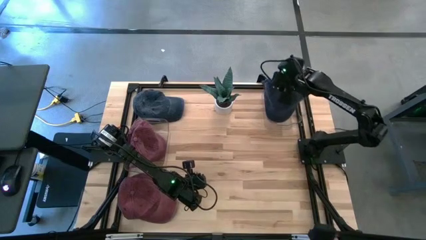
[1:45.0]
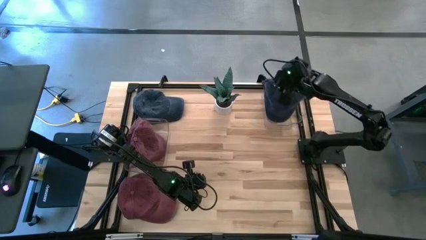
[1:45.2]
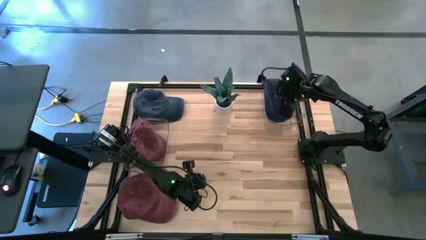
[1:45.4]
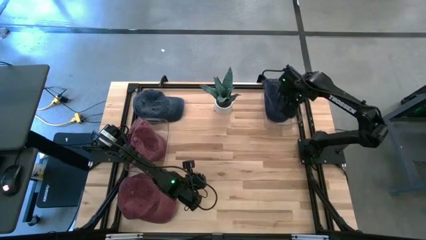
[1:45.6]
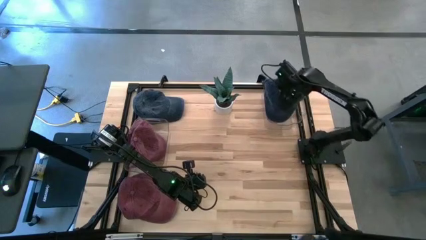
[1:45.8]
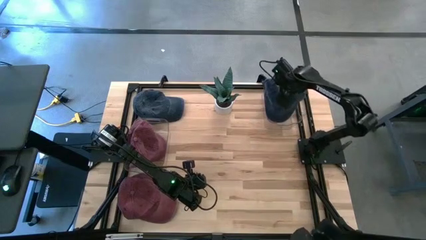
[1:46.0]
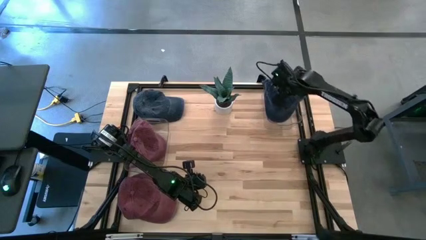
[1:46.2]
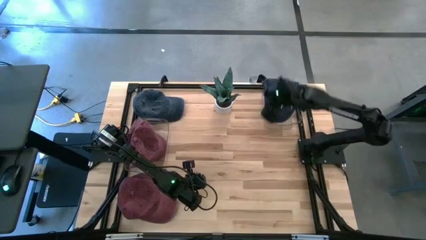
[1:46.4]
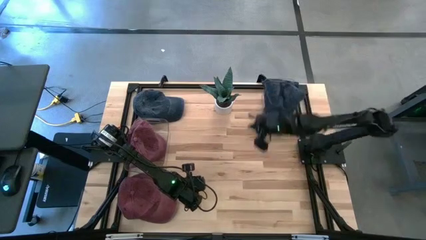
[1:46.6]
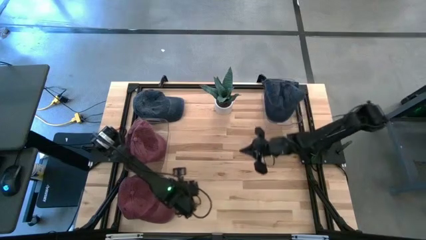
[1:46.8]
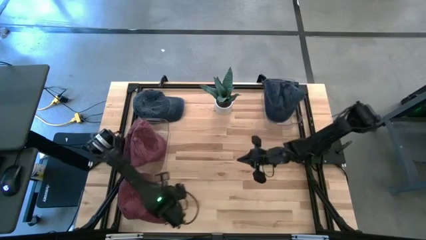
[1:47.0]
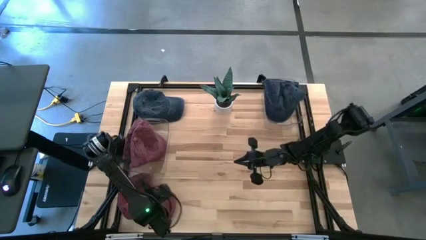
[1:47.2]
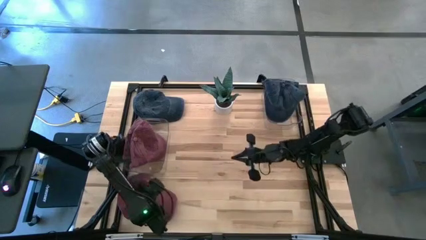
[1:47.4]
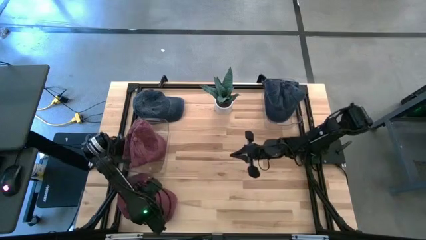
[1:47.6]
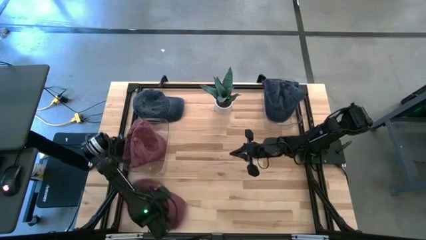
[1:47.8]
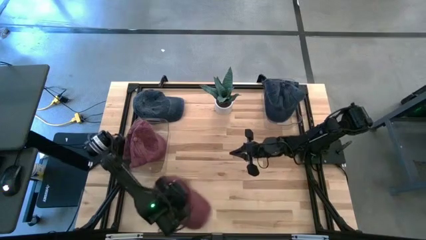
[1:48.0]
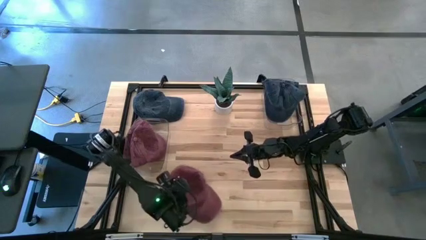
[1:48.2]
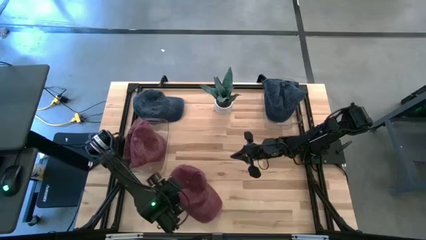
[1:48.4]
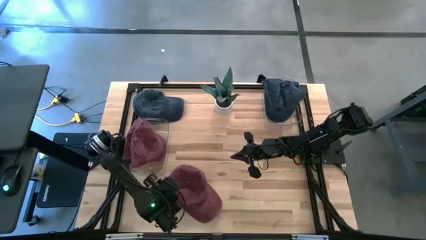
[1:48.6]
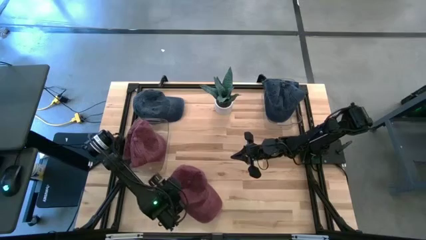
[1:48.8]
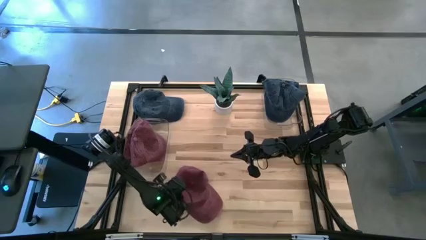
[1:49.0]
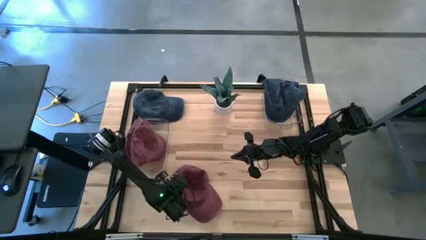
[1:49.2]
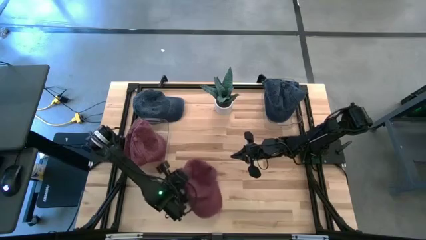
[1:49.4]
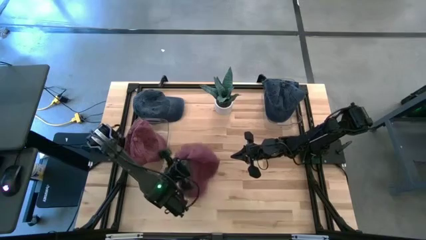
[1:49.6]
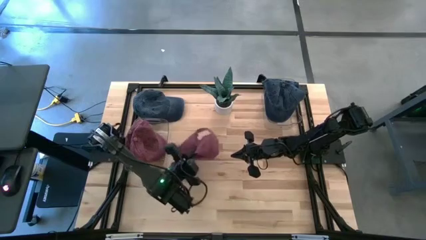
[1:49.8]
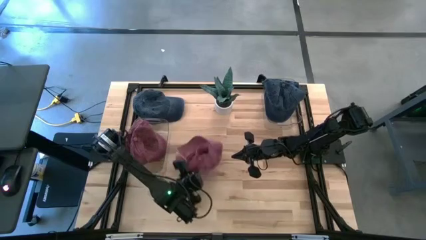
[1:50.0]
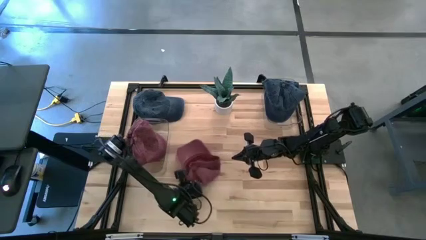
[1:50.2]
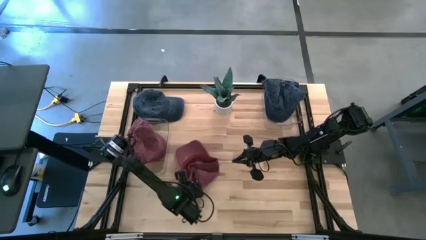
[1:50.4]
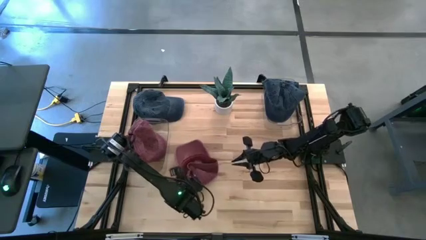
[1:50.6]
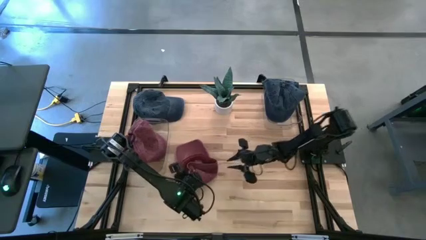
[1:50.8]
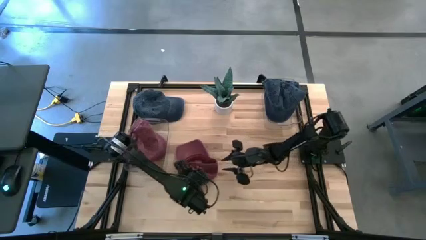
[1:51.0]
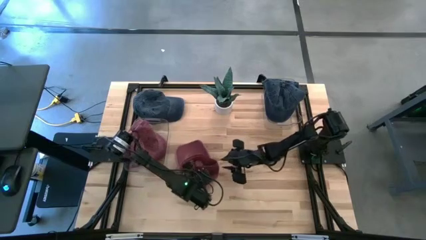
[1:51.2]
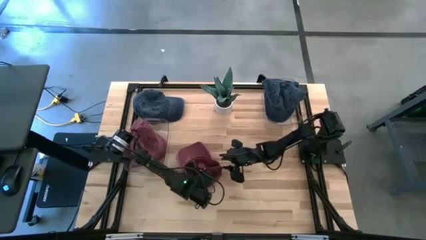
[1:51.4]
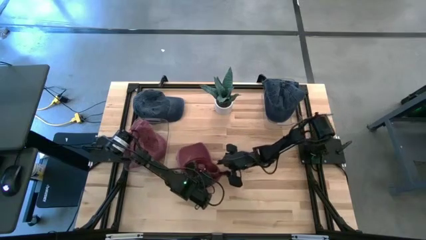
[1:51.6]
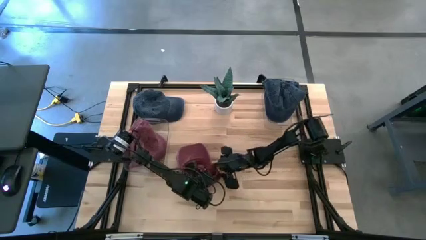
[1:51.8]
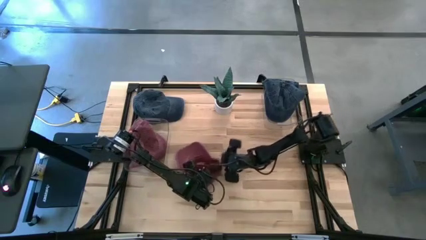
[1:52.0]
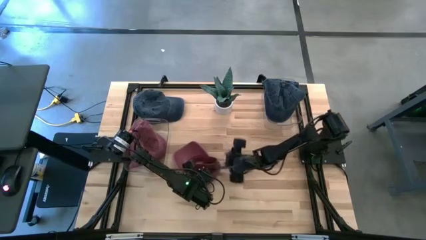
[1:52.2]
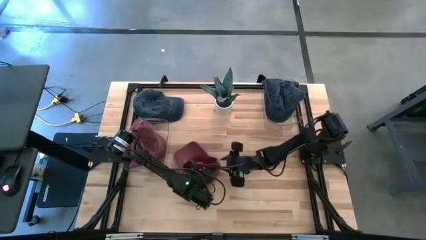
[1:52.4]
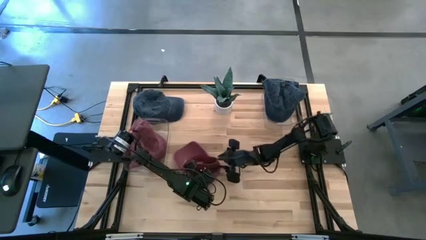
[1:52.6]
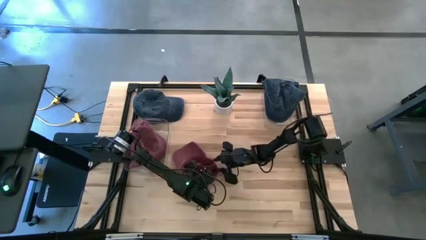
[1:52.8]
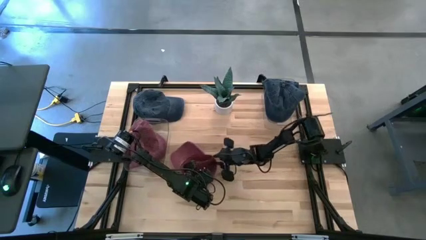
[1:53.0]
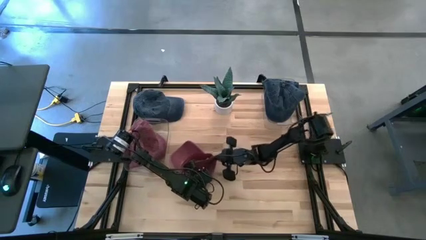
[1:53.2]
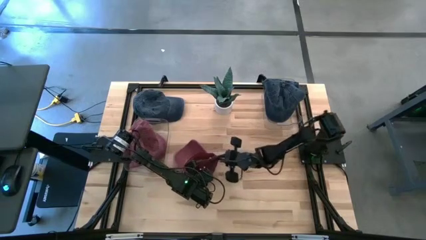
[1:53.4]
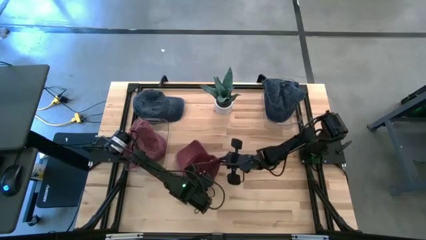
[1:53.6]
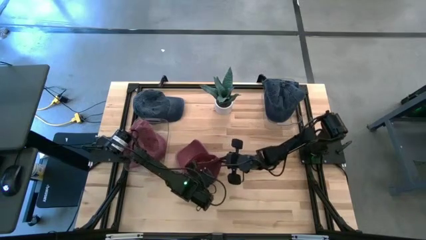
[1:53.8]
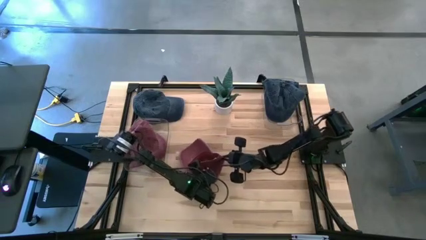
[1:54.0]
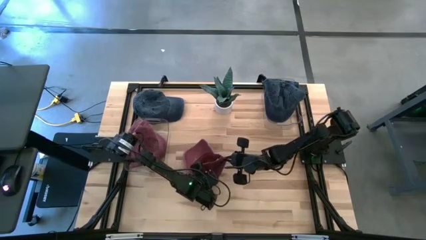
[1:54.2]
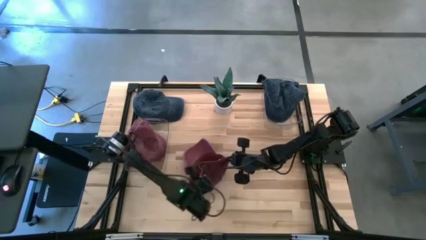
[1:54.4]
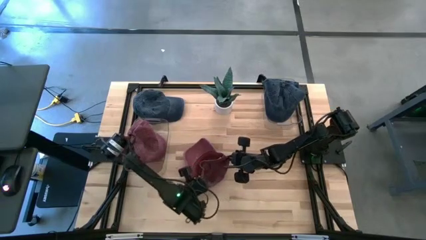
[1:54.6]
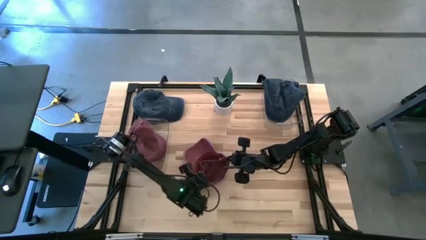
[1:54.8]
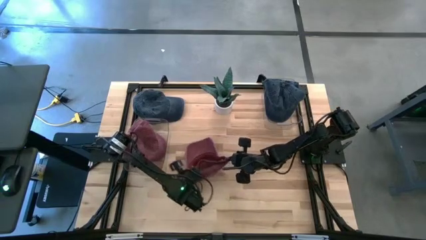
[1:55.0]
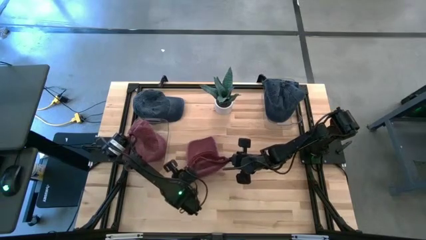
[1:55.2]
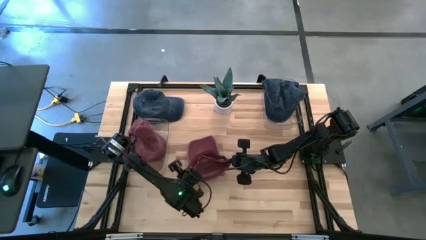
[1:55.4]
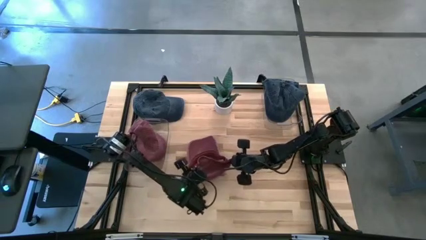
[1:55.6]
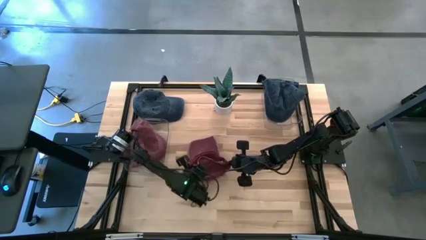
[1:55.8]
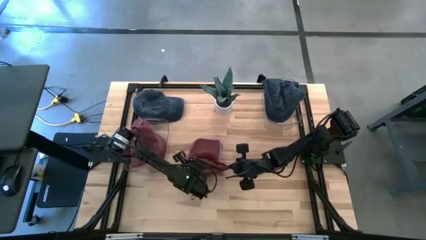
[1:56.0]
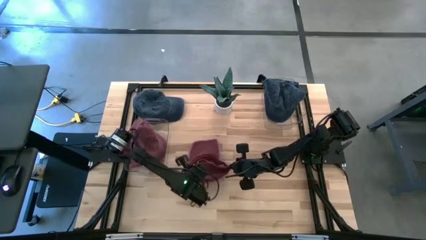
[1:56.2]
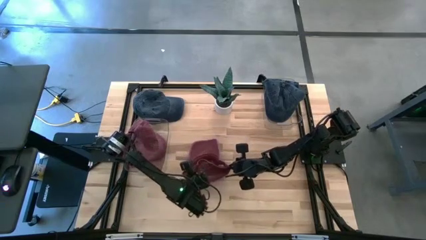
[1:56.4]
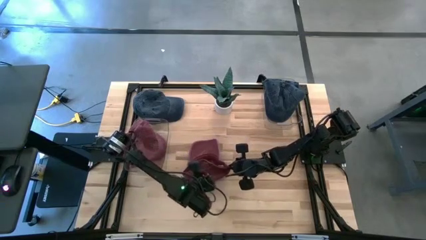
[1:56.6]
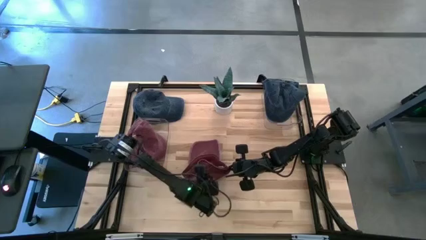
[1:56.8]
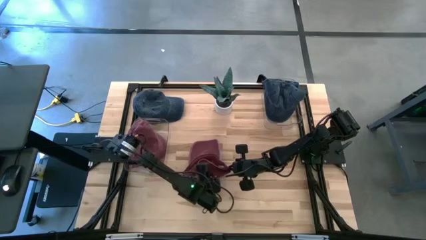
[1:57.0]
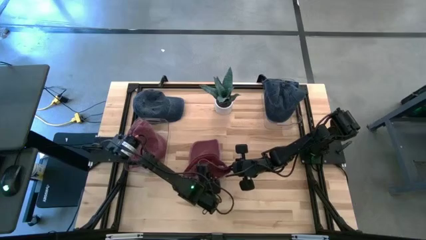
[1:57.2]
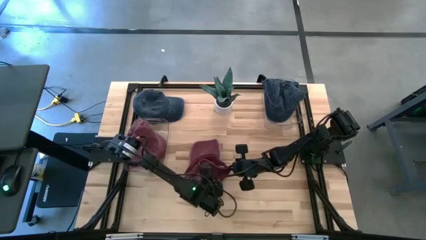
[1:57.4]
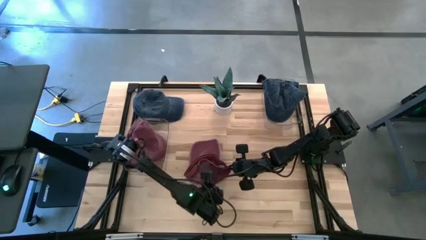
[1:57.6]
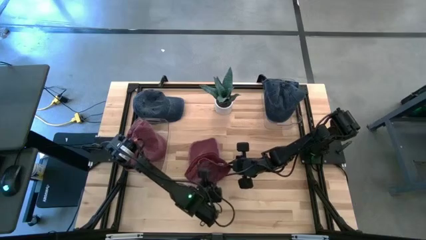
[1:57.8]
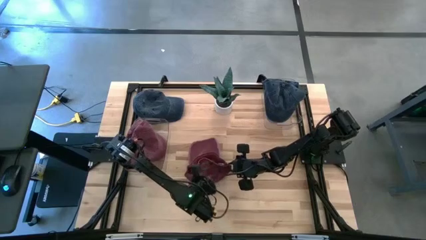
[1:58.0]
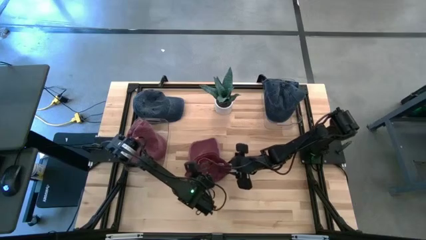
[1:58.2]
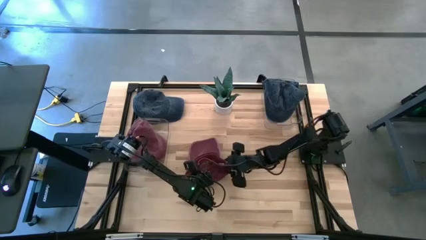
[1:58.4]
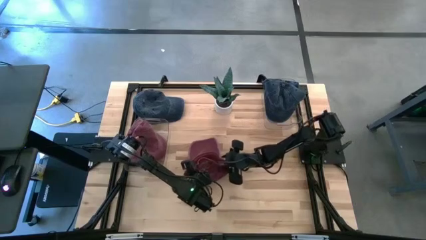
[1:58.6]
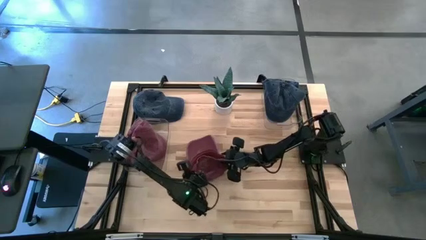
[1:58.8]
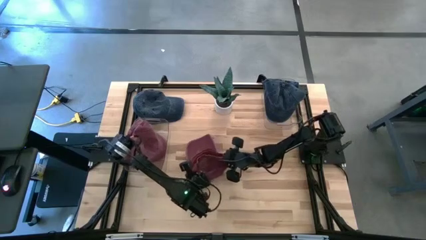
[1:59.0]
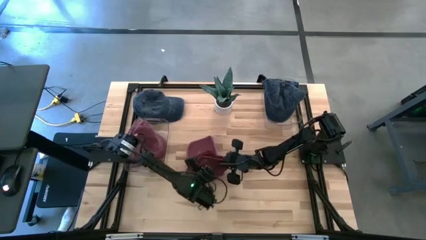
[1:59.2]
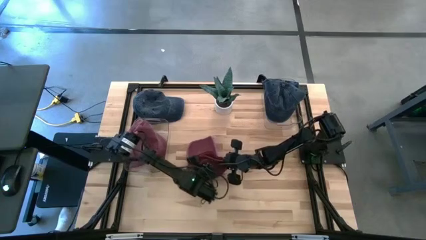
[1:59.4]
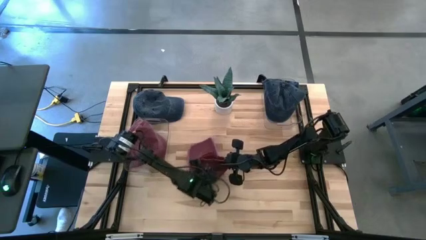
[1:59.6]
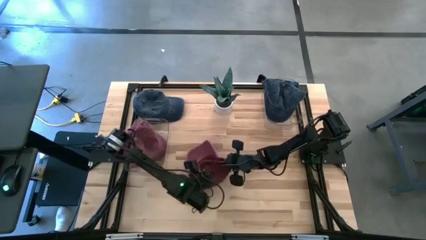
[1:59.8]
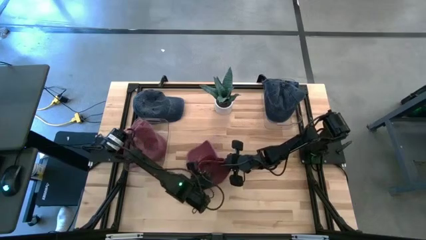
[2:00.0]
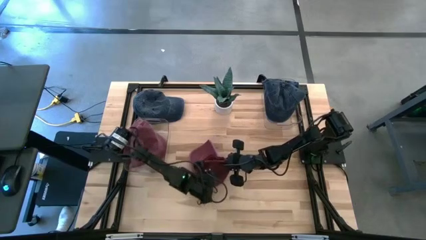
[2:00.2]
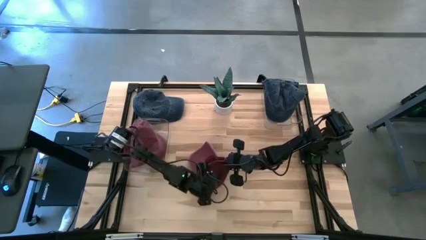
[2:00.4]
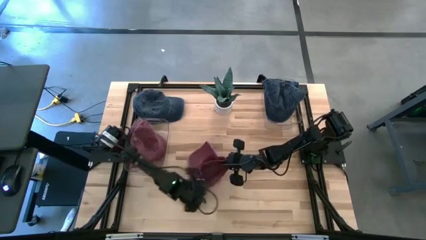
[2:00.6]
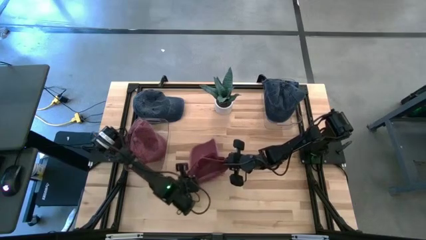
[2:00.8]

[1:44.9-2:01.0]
Task: Pick & Place hat
Put the red cap into the left transparent bin
